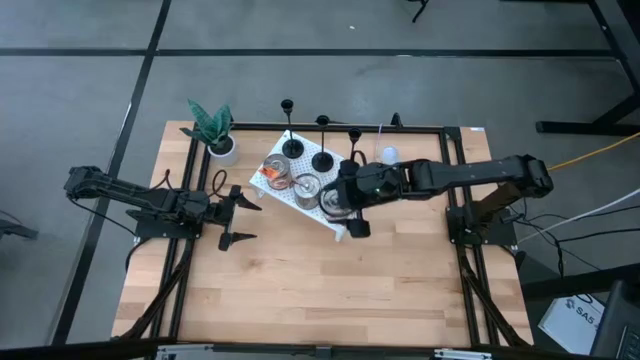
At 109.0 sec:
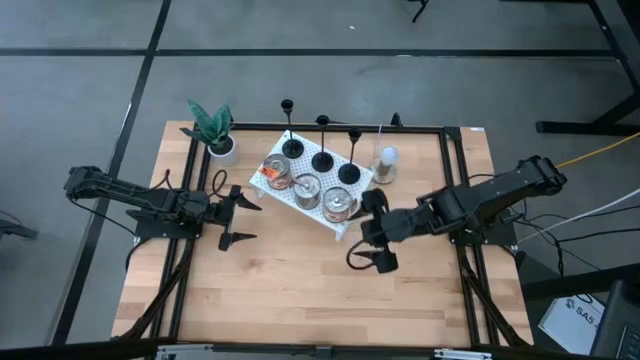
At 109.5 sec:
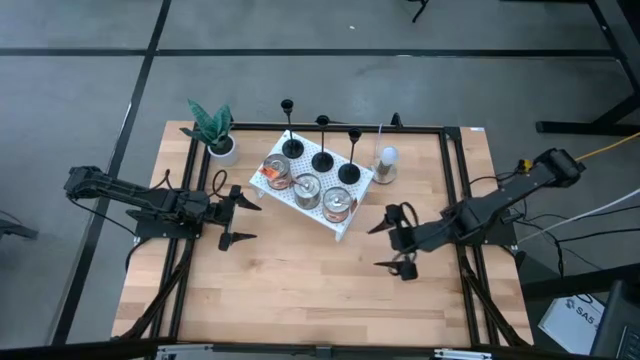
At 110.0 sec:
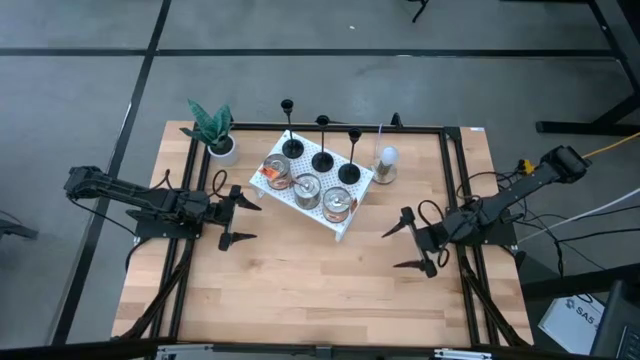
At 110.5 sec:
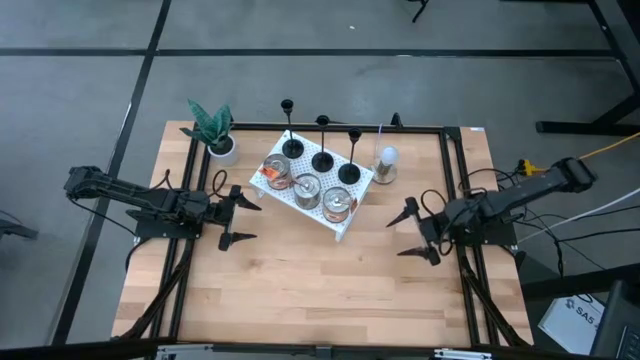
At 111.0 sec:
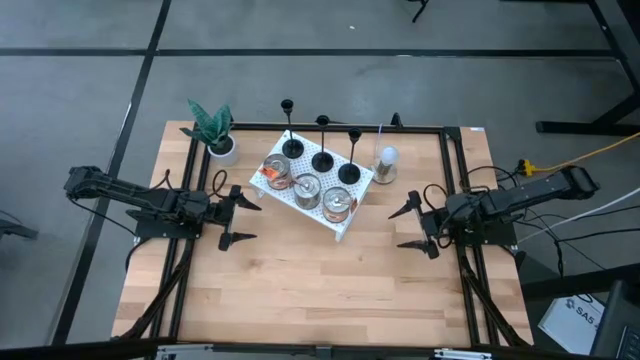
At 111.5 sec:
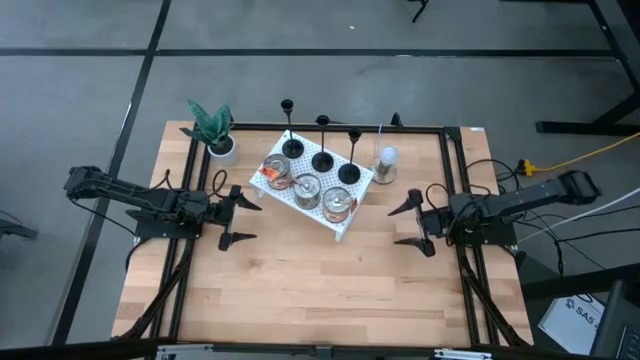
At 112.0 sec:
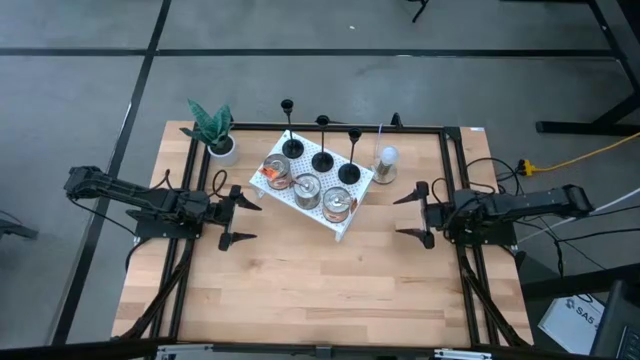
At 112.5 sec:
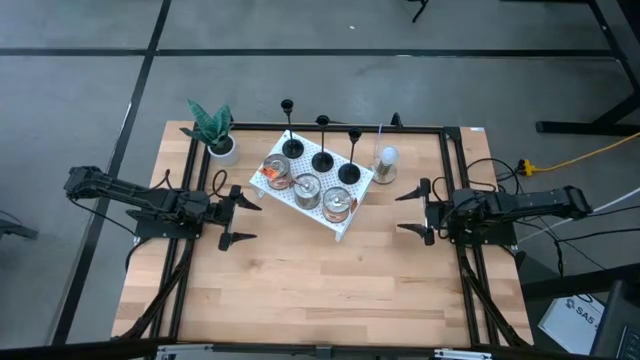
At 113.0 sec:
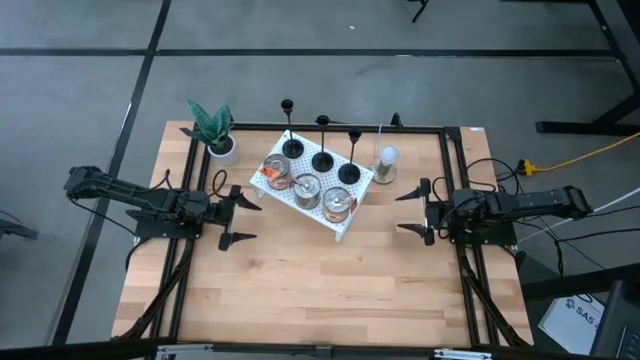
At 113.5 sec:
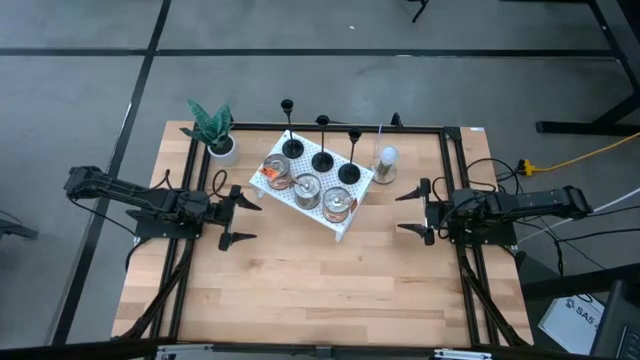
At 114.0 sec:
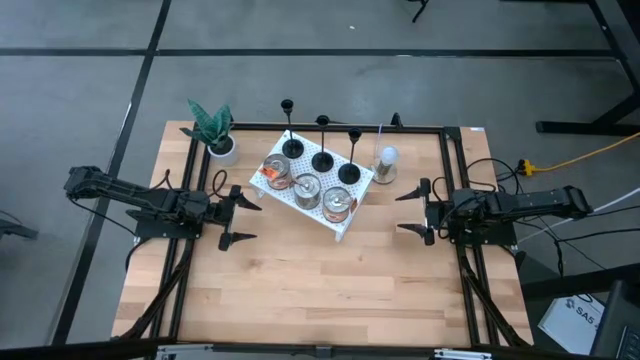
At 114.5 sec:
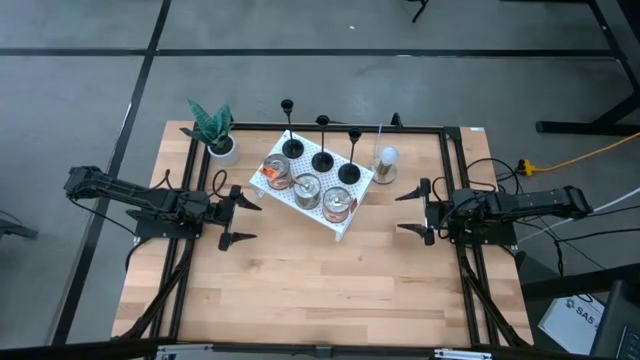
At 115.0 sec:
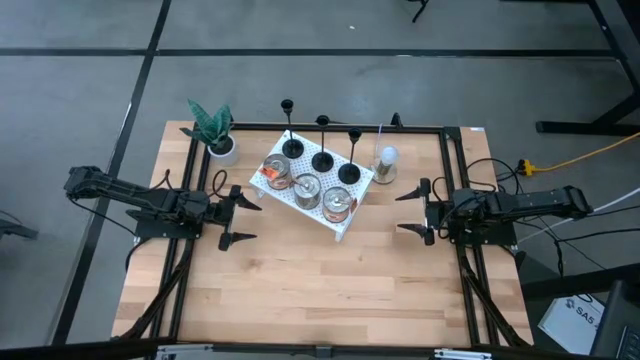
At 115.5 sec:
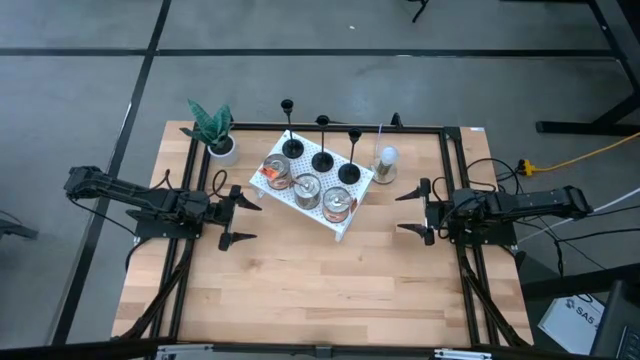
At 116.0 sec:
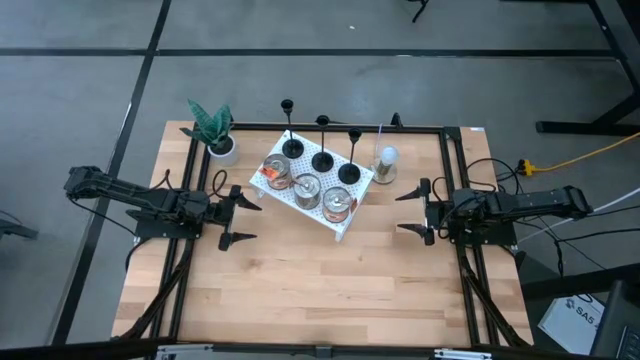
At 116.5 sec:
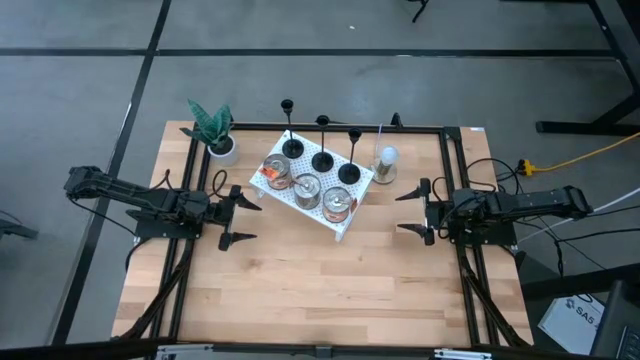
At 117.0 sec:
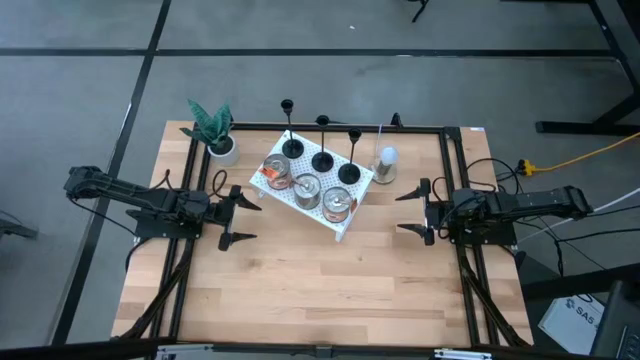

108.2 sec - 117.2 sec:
Task: Pick & Place candle stick holders
Return to Home Position

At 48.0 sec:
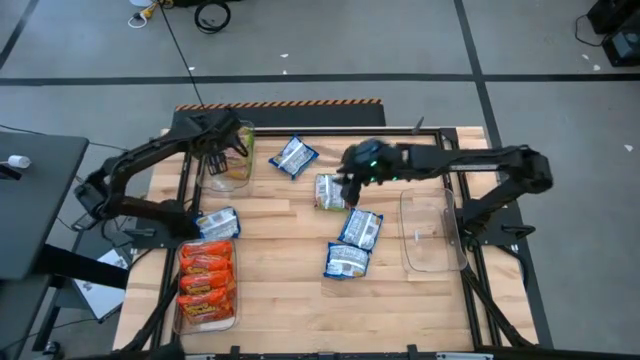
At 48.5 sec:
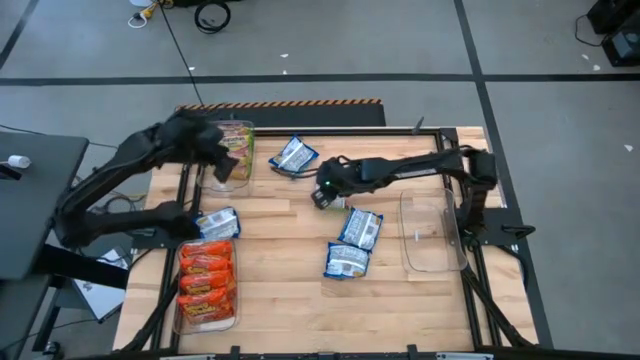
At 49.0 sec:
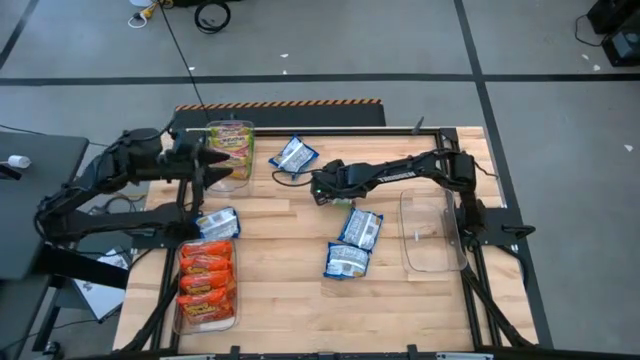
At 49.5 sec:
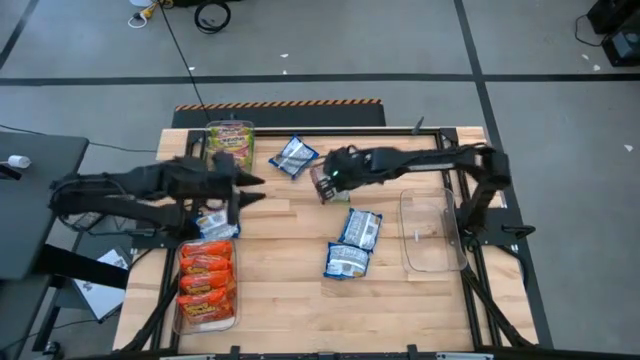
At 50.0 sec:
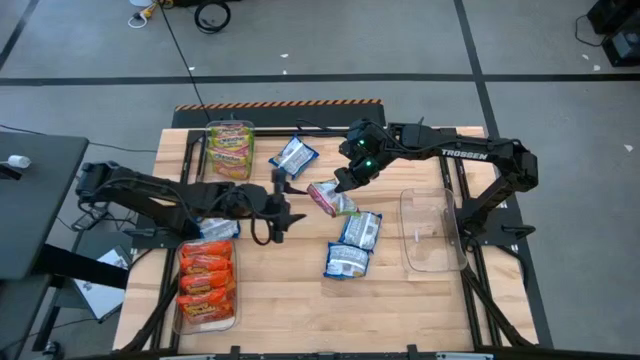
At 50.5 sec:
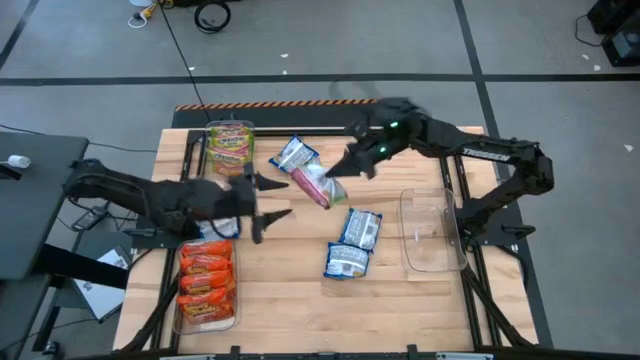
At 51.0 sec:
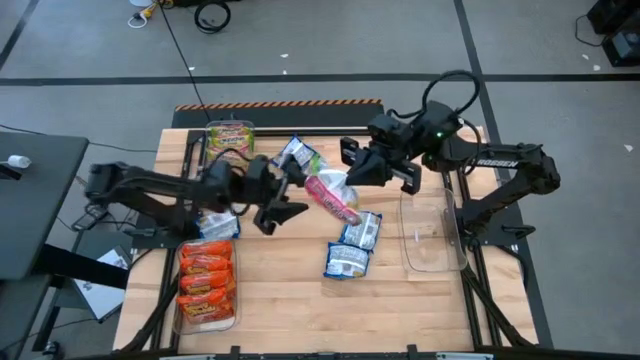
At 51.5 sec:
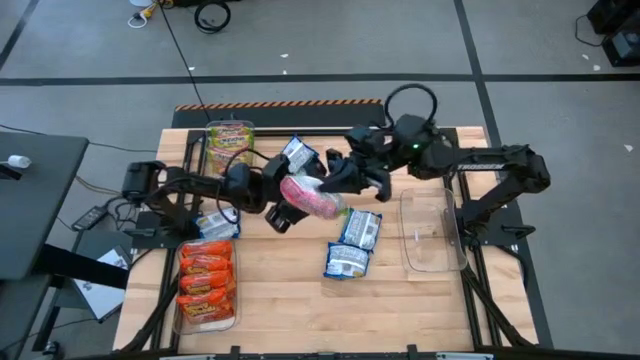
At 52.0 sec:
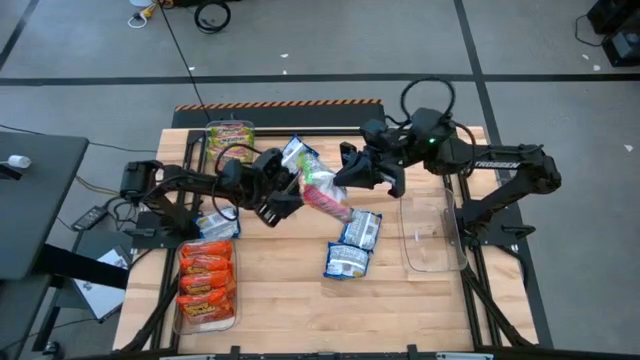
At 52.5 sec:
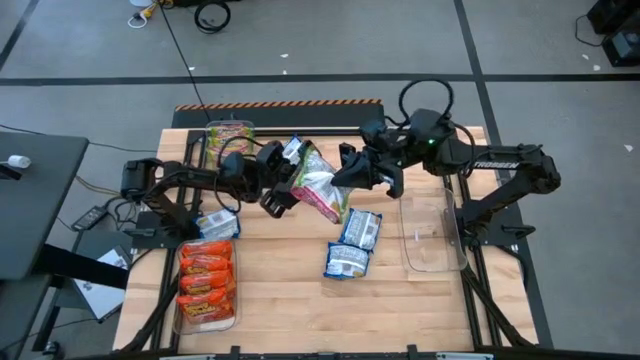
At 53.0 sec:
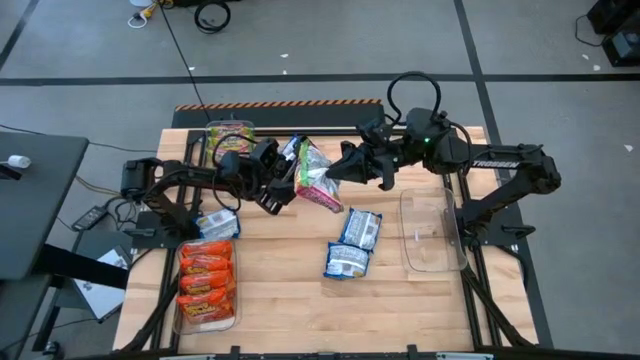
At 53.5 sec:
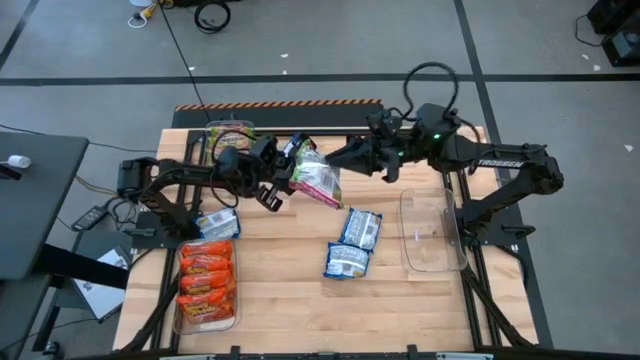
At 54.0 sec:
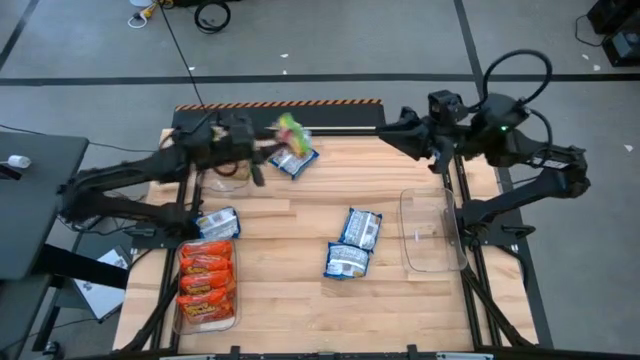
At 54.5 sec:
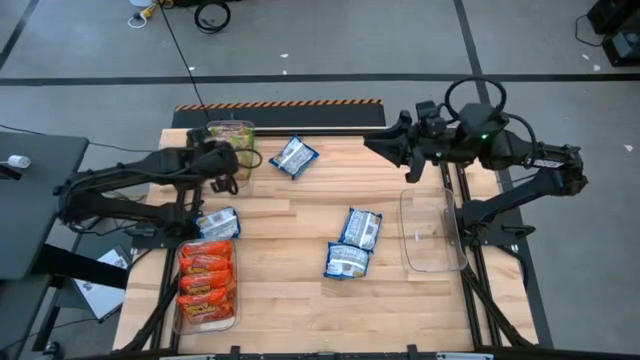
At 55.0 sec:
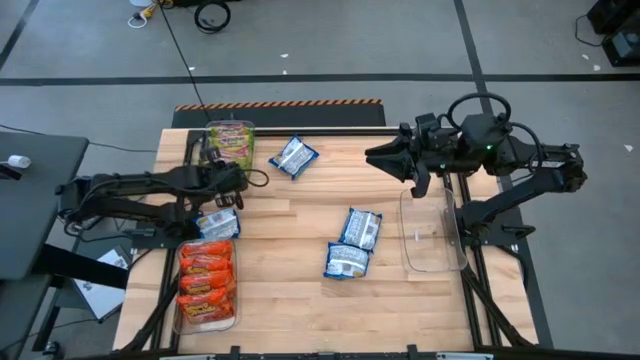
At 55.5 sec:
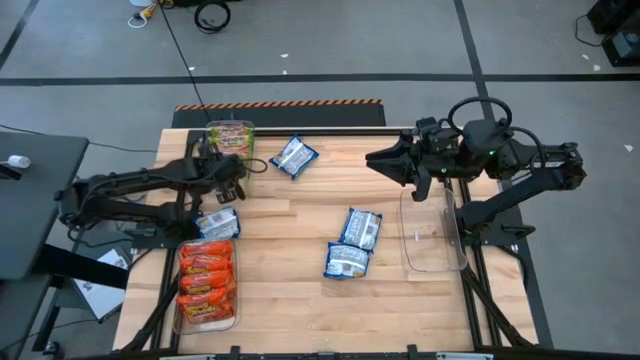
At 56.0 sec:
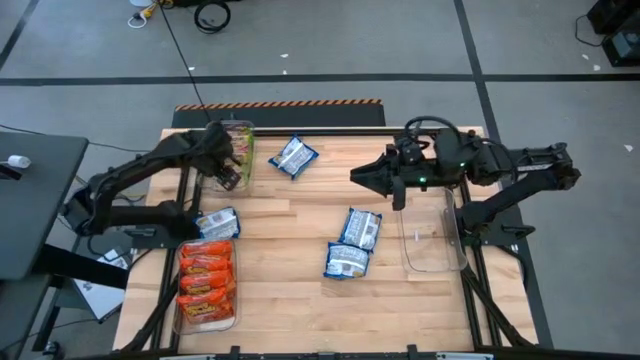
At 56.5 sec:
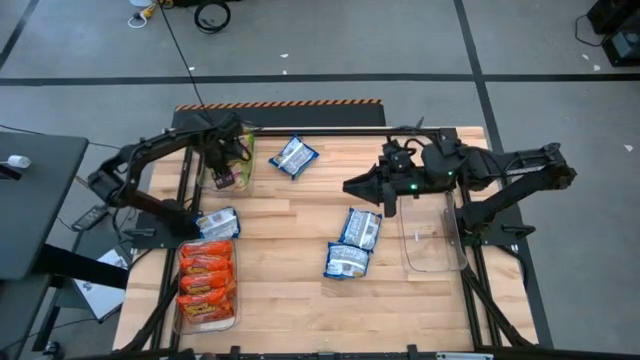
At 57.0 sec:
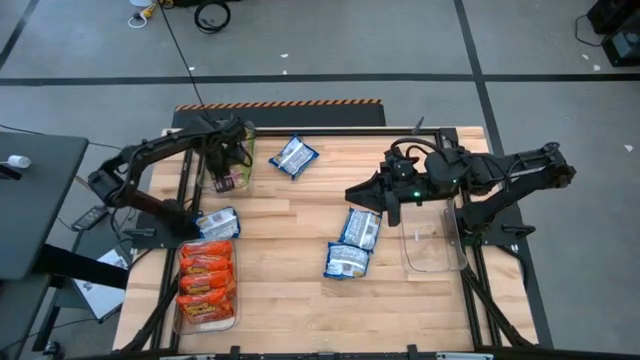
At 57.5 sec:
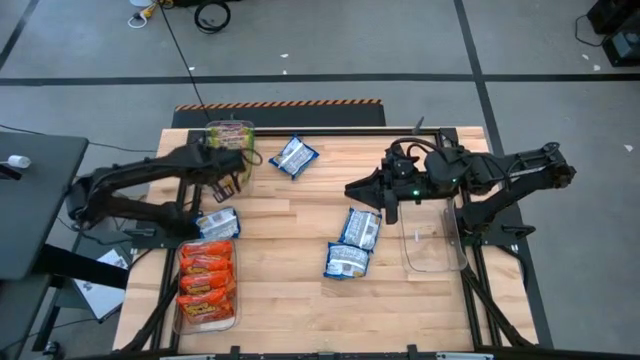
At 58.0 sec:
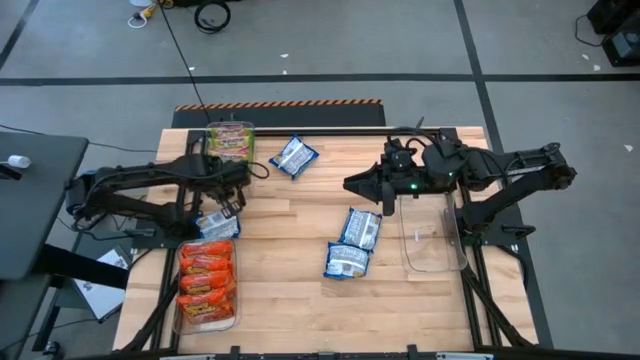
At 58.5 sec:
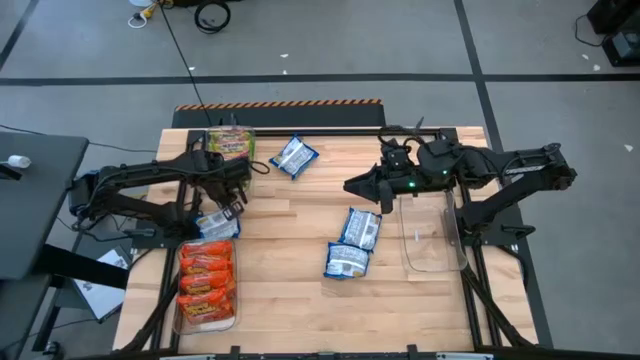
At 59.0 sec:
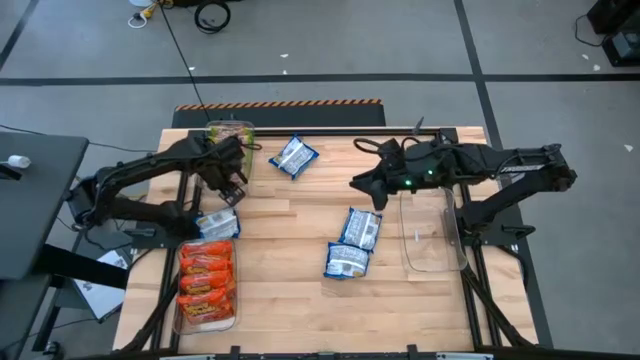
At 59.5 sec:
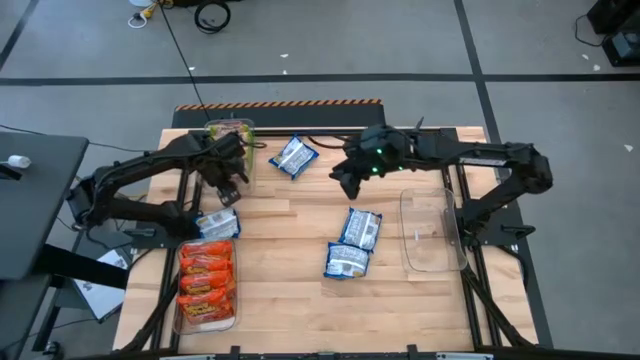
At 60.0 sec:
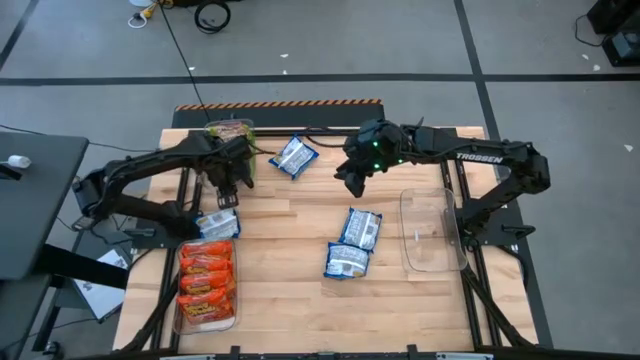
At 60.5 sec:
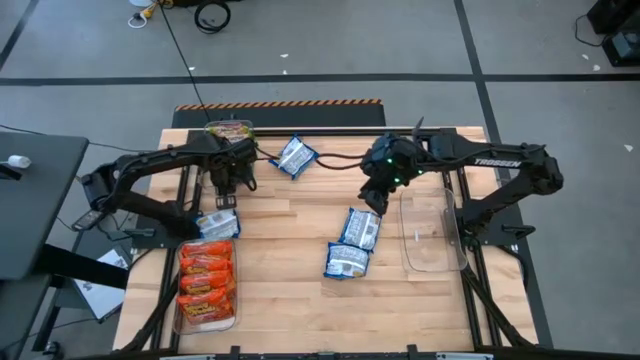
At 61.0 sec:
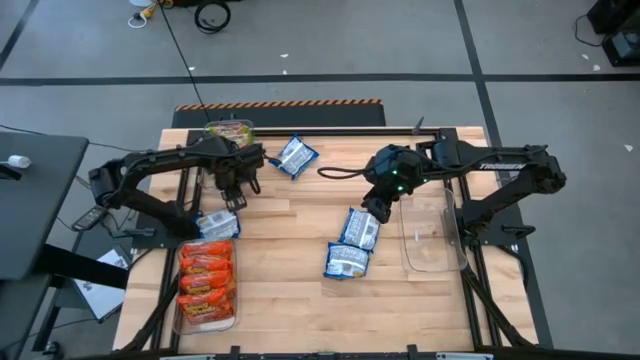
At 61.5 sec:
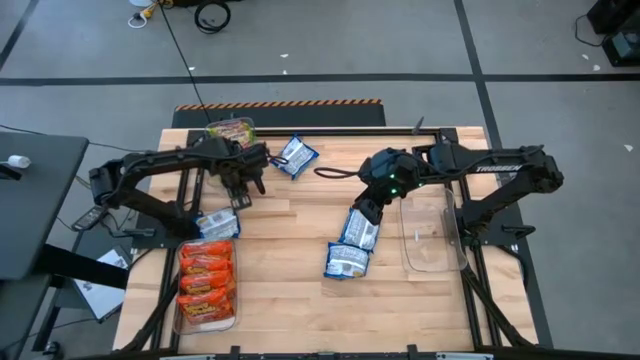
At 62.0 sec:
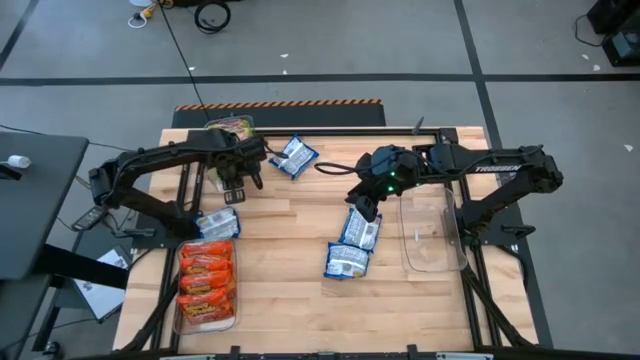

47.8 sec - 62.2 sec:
Task: Sort Maruchan noodles
Put the green noodle pack into the top left transparent bin
